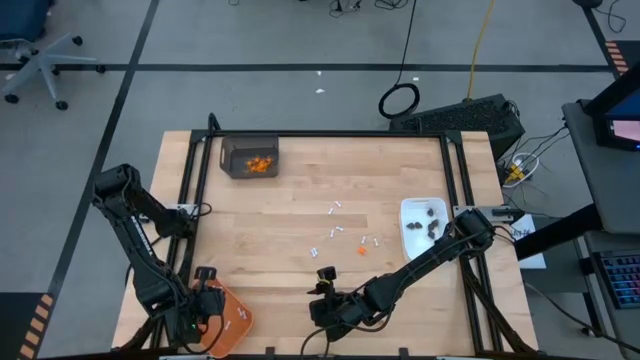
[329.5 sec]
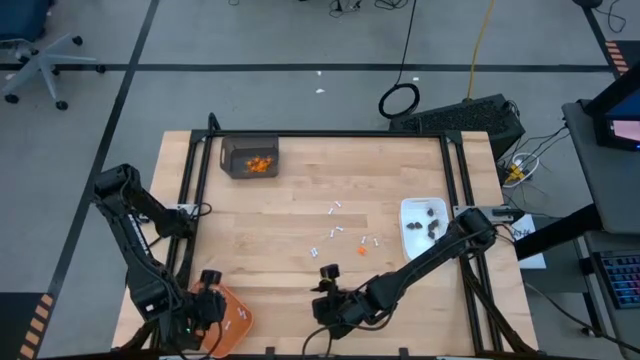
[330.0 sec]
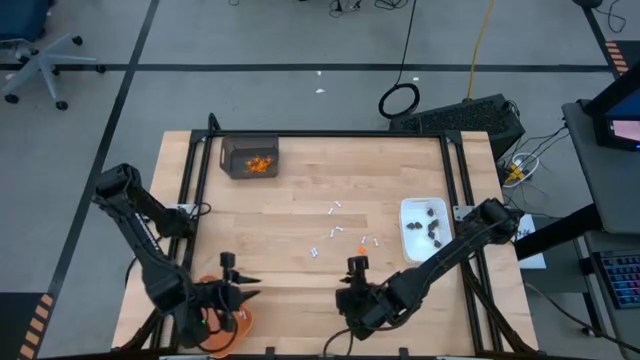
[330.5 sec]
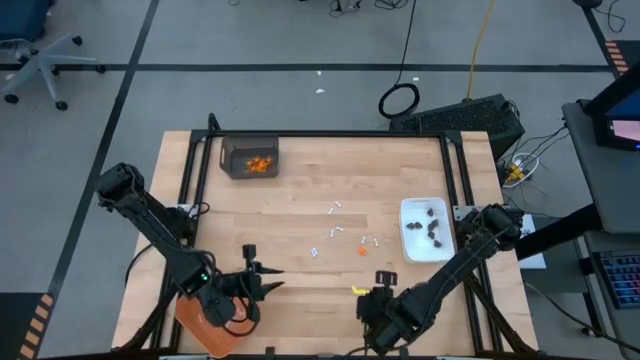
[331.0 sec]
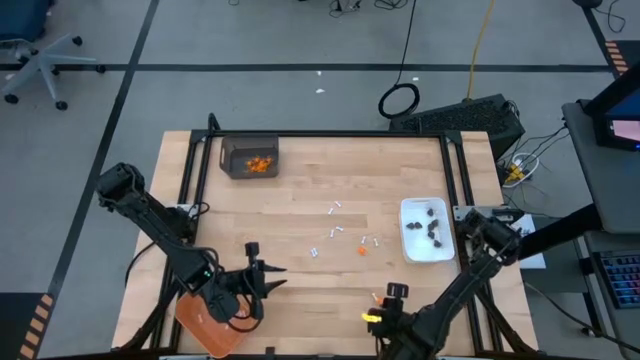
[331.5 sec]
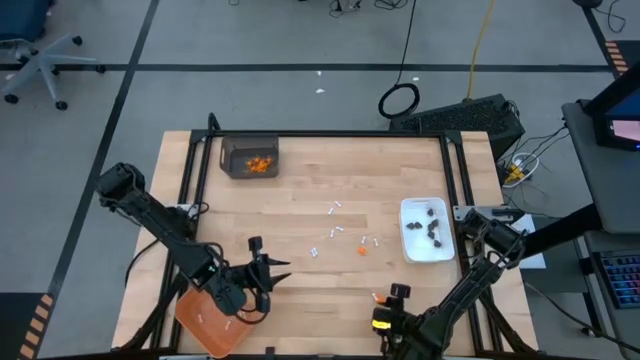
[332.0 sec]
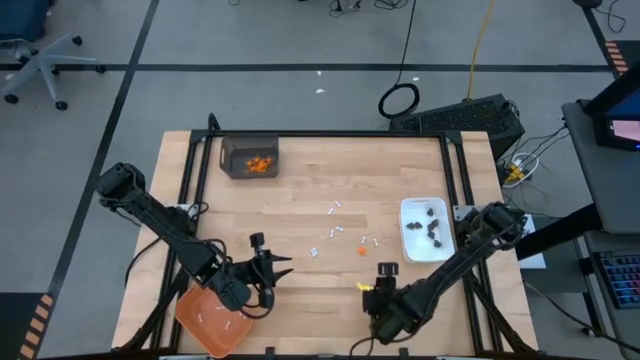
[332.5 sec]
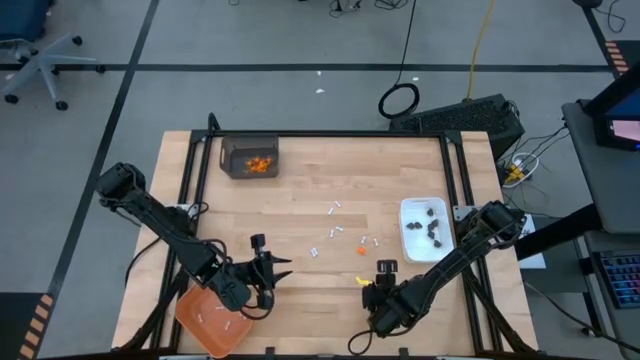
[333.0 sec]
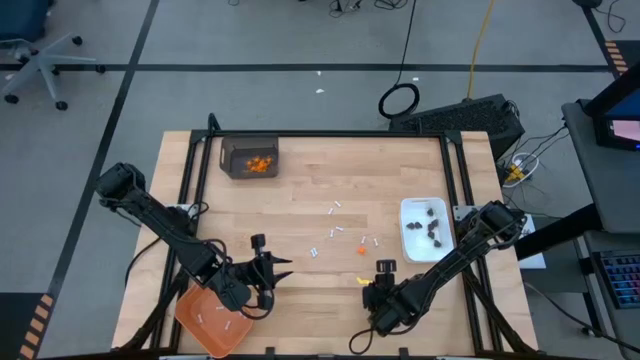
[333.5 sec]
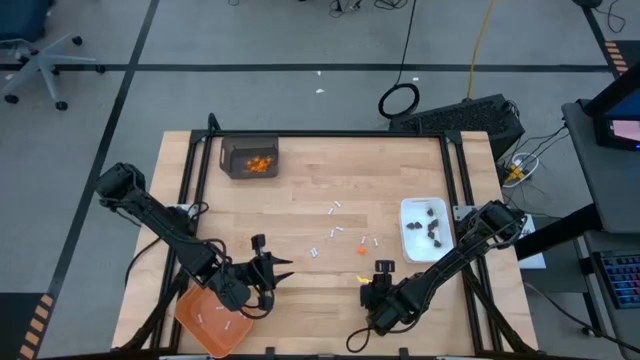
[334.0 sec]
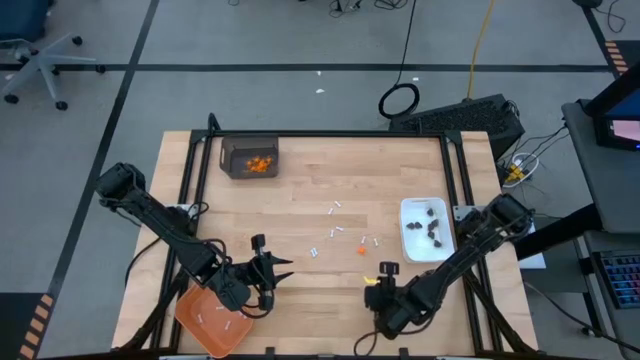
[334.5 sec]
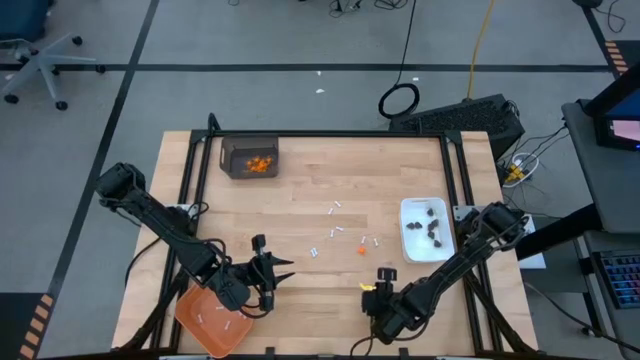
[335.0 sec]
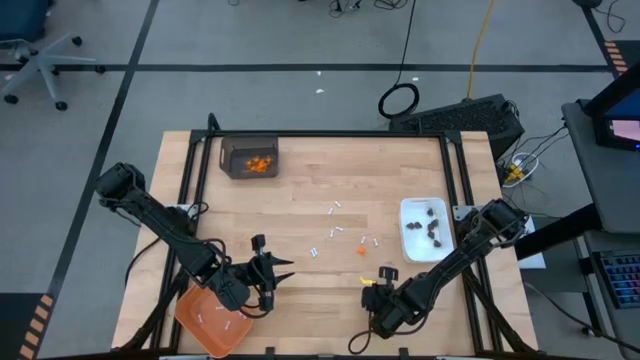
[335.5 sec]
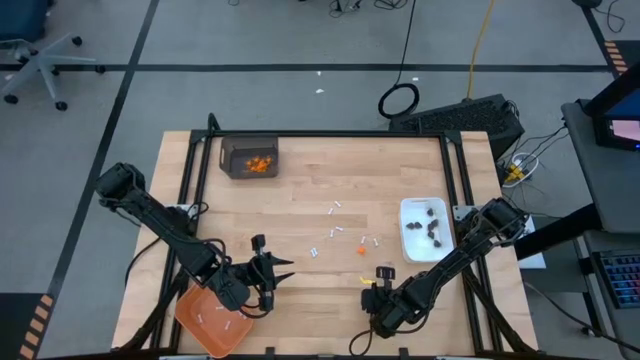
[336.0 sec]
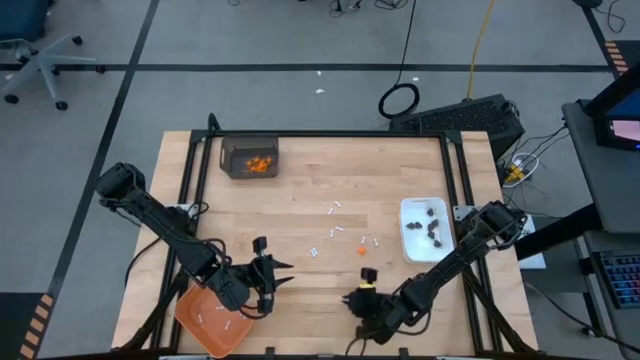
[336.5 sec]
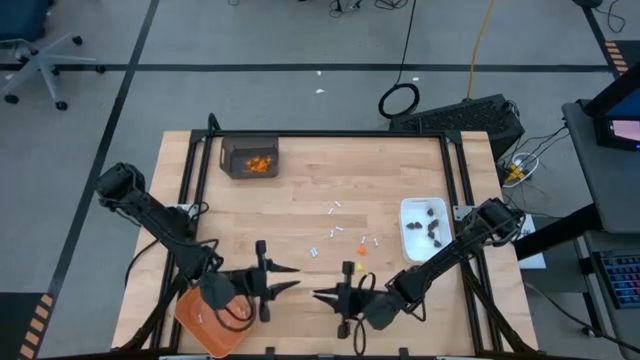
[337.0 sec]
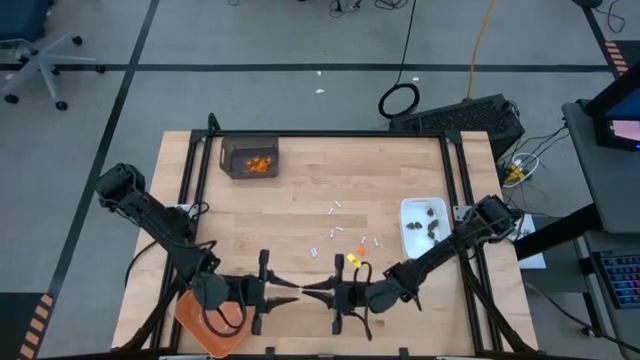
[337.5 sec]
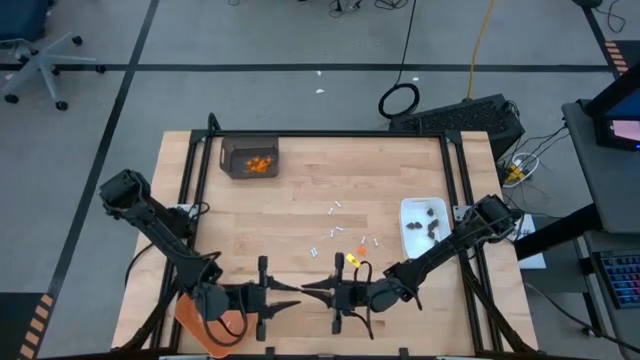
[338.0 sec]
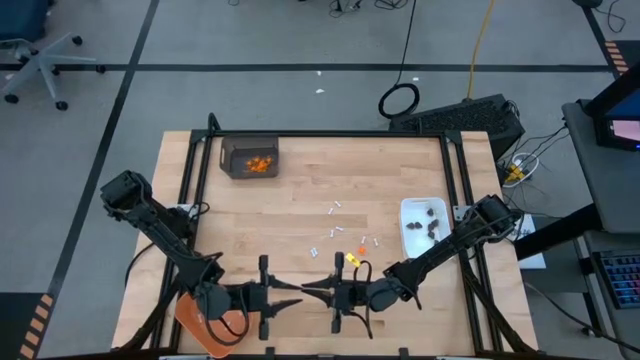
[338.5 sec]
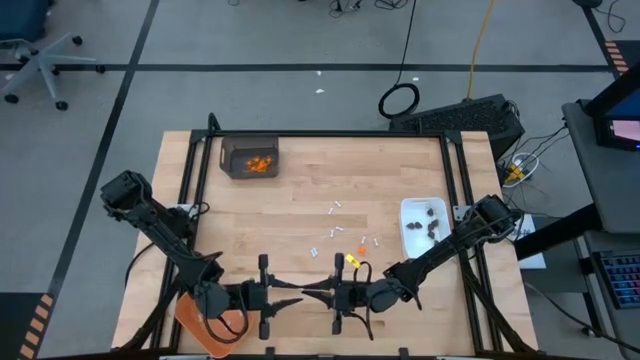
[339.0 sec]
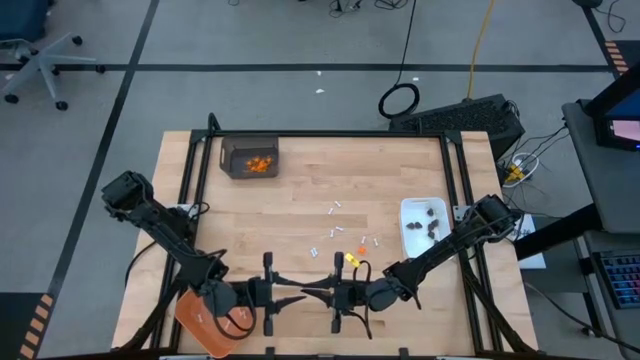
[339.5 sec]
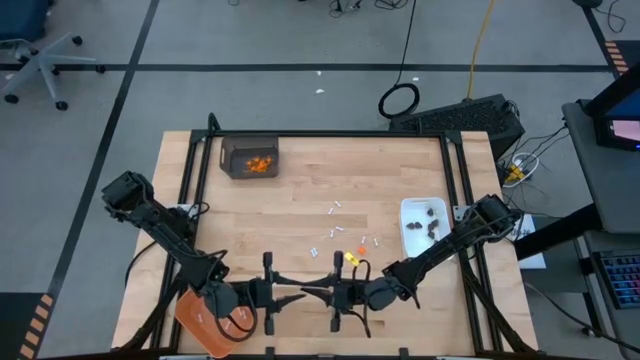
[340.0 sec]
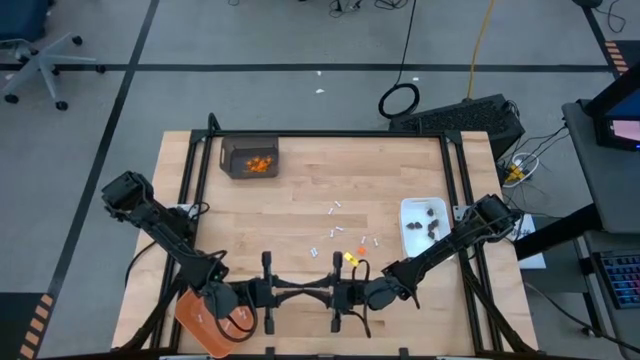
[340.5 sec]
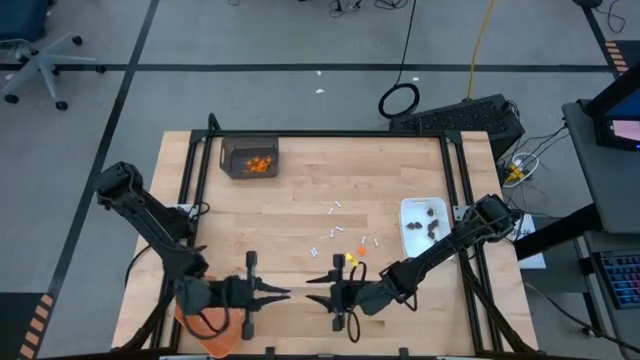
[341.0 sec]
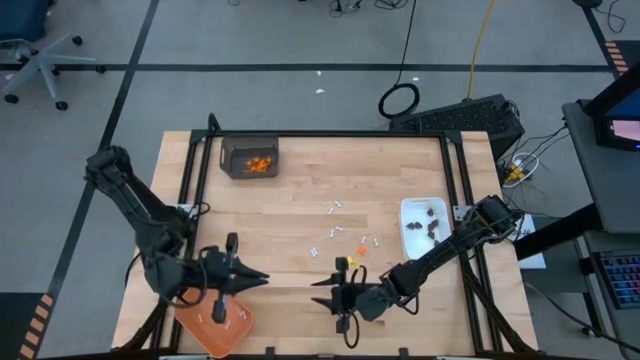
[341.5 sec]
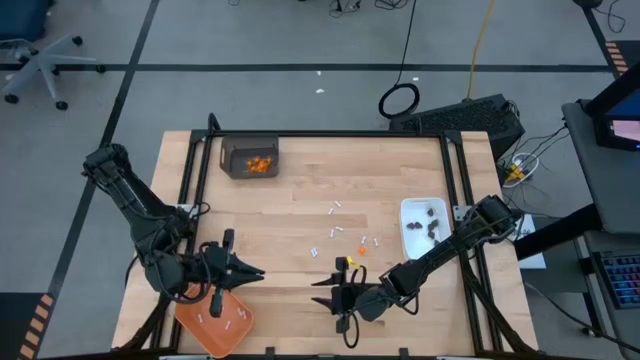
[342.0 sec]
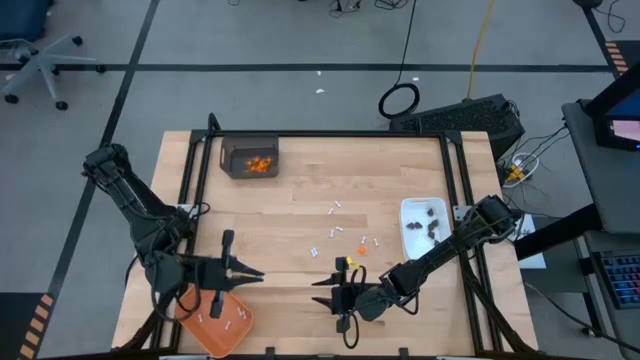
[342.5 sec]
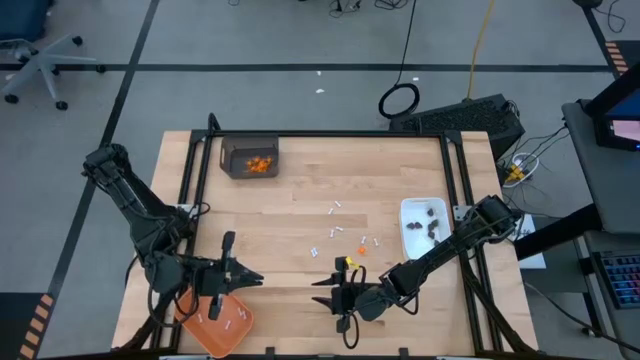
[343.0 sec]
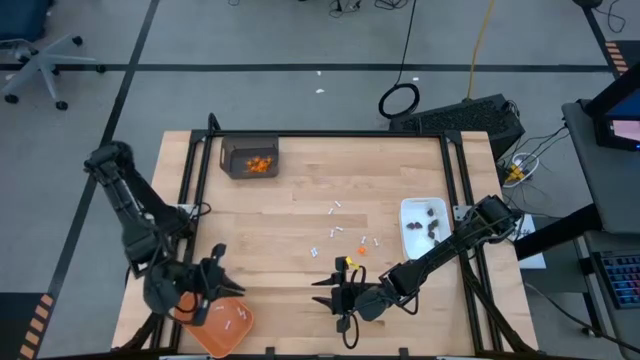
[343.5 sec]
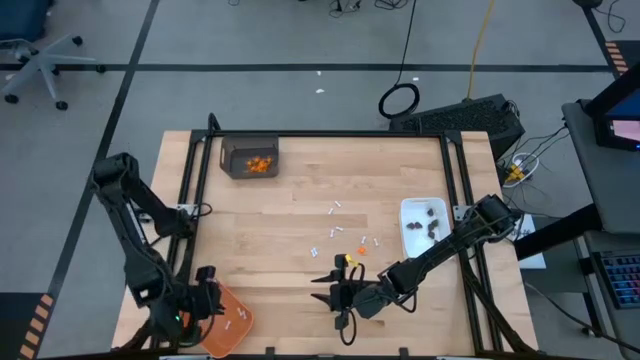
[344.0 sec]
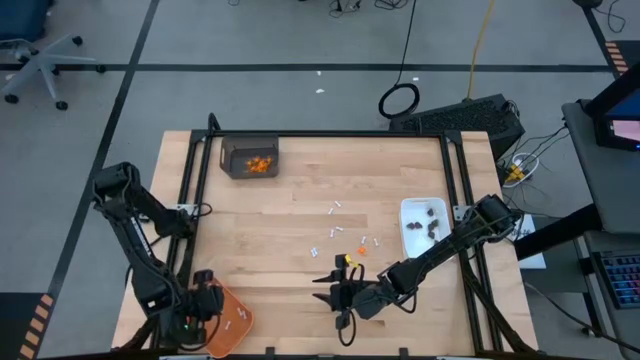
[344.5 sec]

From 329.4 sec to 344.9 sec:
Task: Sort Halloween decoration
Put the white bone toy into the orange bin

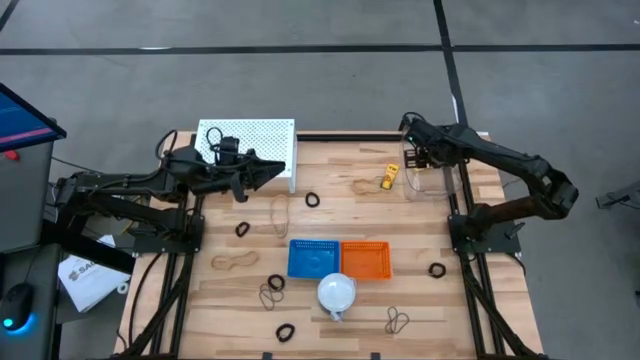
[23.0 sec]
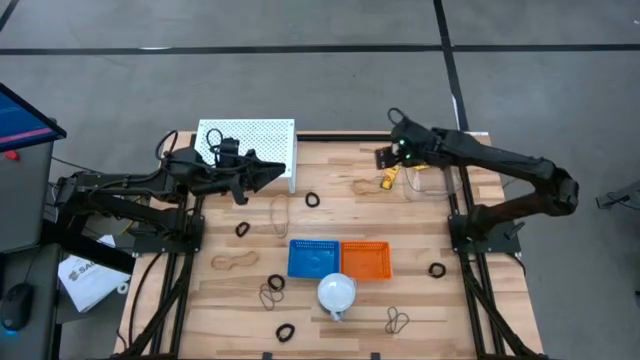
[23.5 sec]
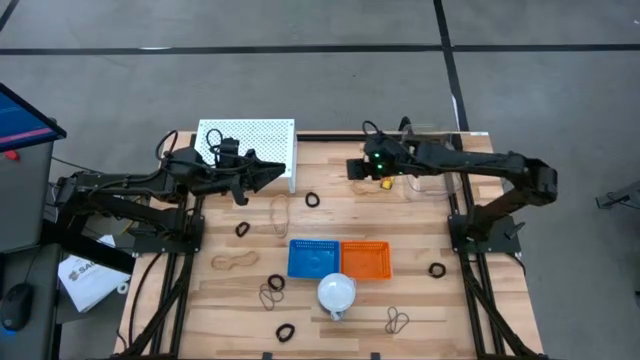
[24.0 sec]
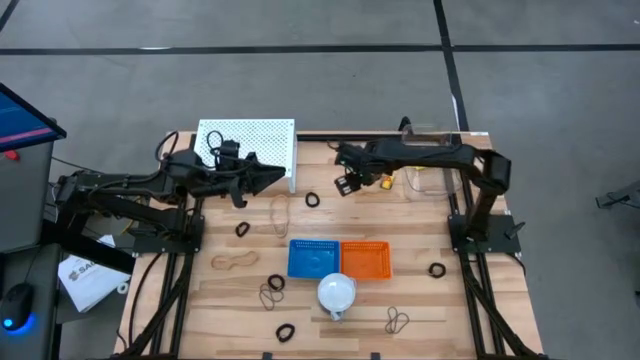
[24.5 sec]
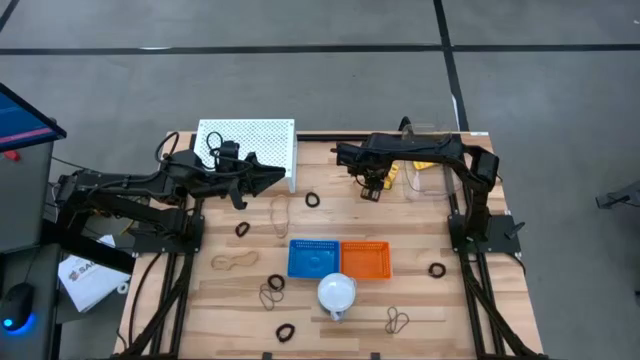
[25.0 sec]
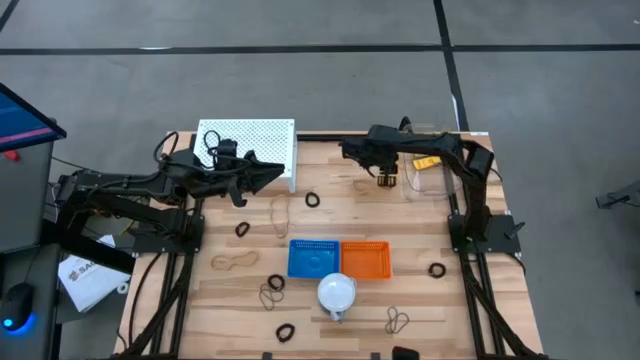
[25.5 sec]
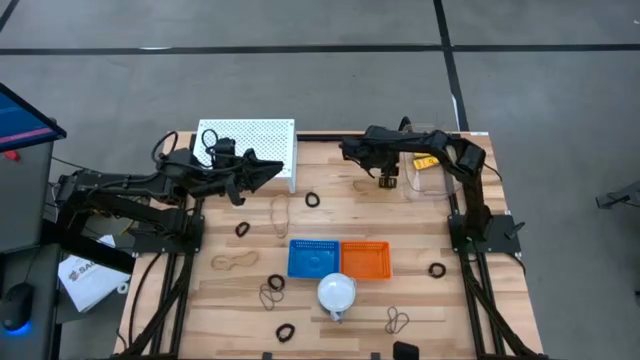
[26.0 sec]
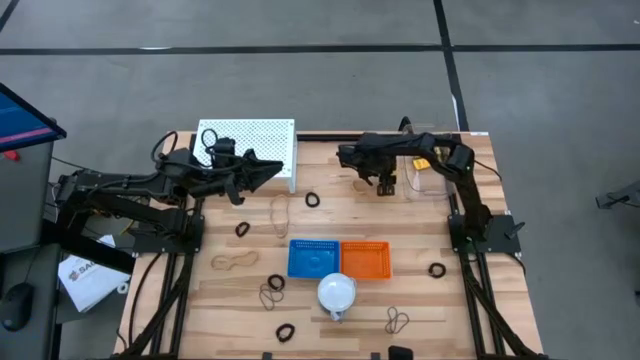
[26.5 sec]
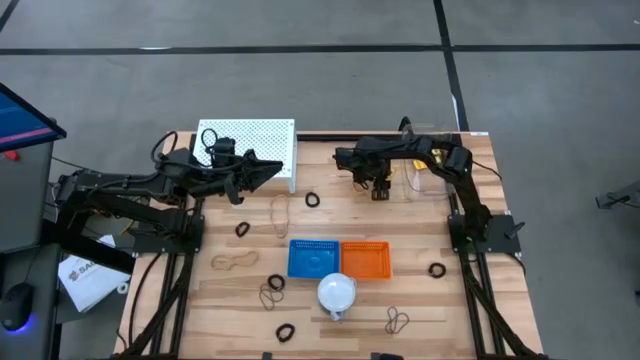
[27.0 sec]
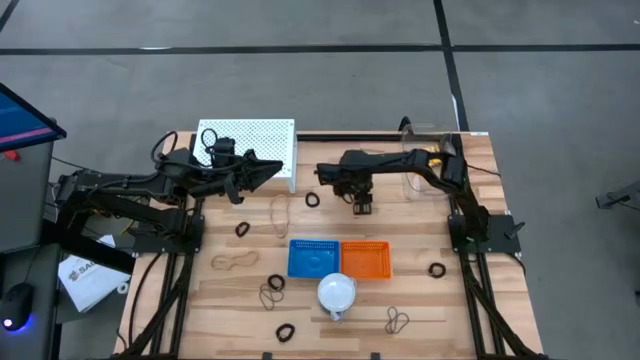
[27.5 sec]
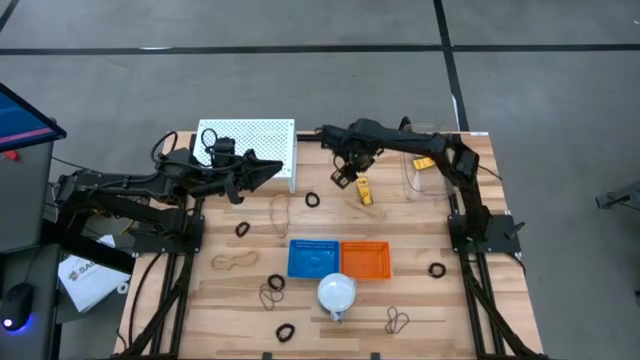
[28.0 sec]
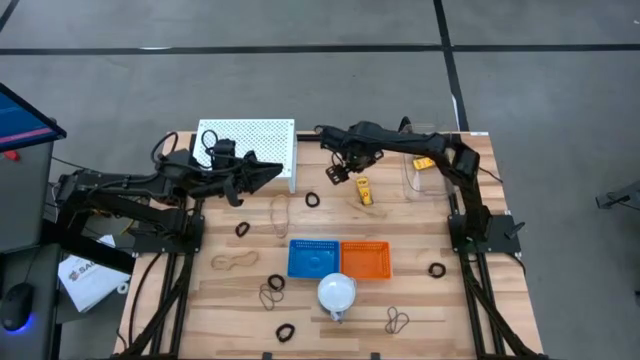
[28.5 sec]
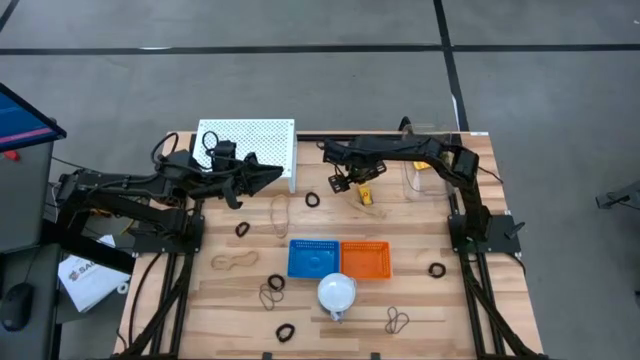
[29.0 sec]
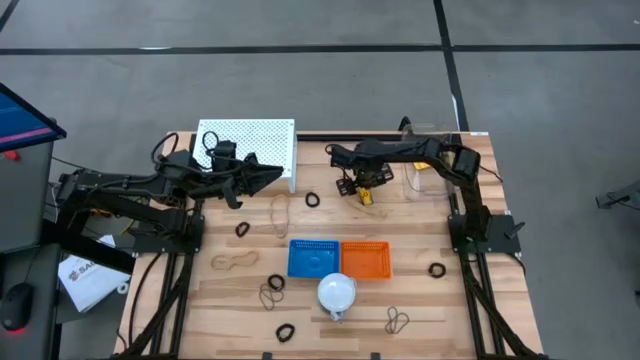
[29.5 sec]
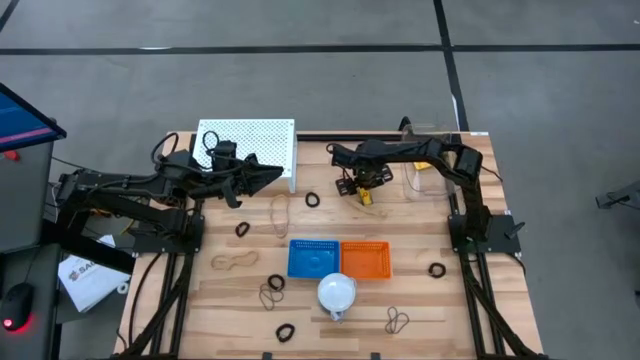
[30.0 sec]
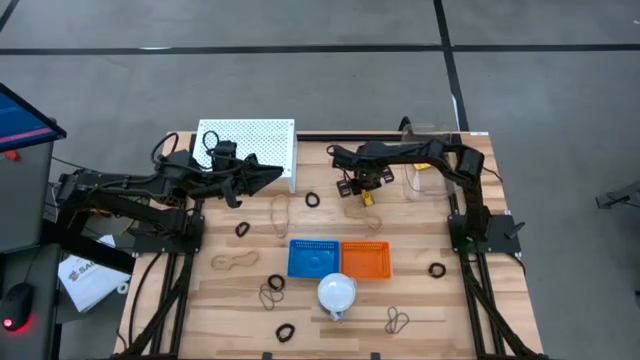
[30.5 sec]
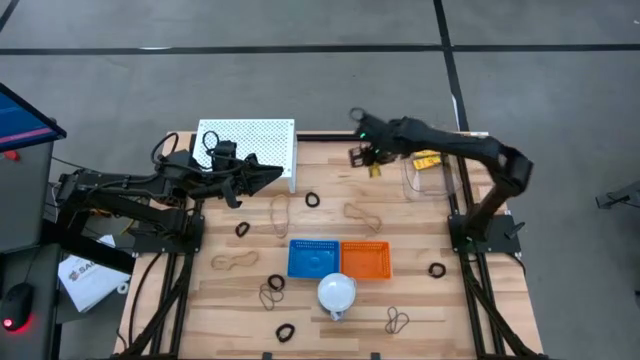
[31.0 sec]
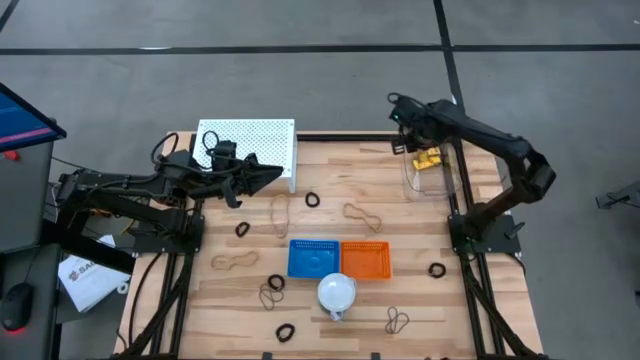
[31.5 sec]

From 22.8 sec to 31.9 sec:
Task: Pick & Place Office Desk Supplies
Put the yellow crayon box into the transparent bin
